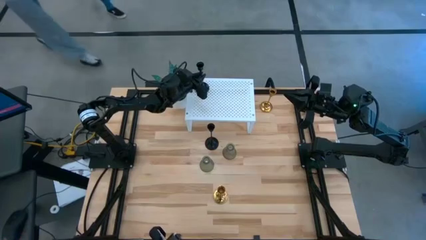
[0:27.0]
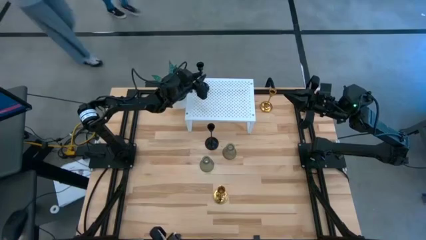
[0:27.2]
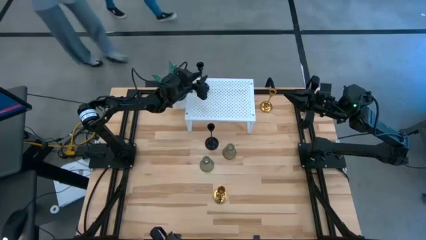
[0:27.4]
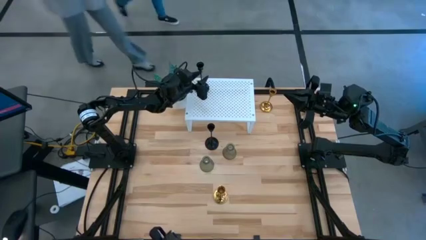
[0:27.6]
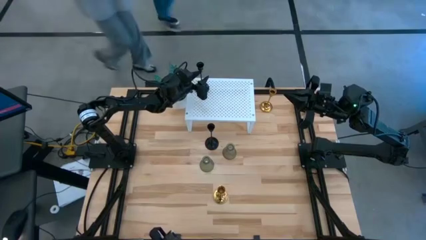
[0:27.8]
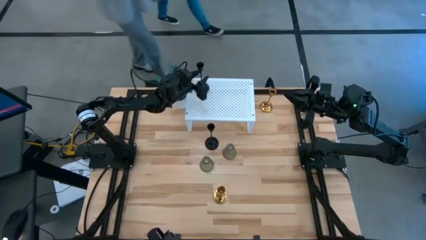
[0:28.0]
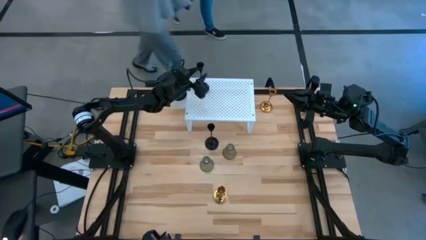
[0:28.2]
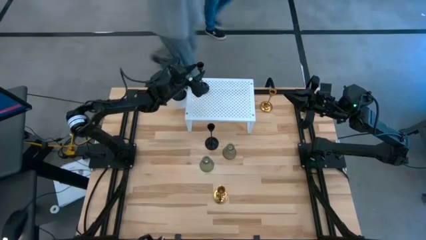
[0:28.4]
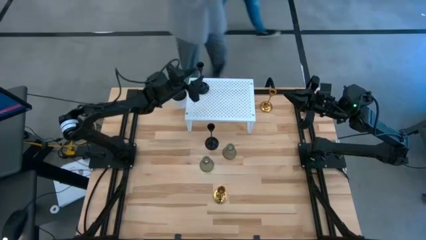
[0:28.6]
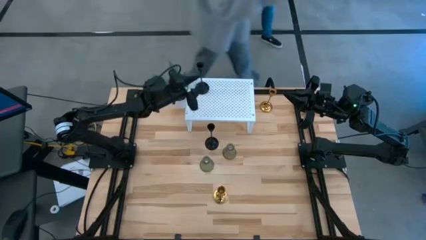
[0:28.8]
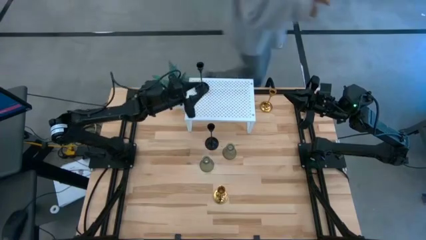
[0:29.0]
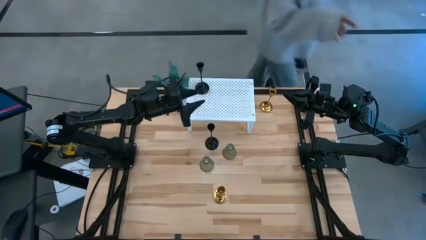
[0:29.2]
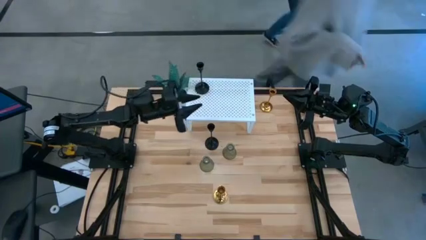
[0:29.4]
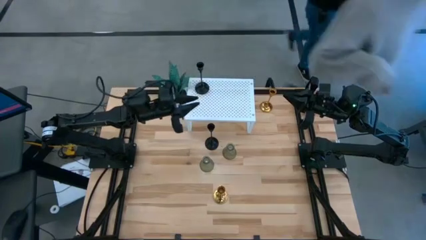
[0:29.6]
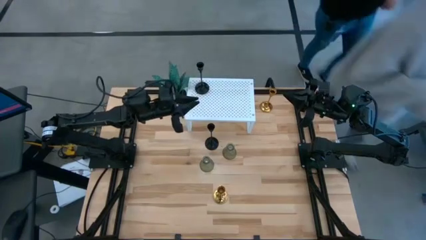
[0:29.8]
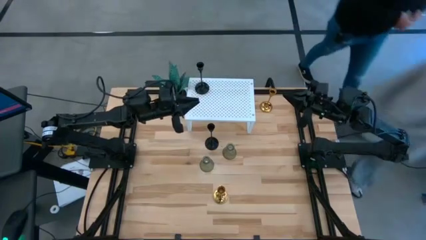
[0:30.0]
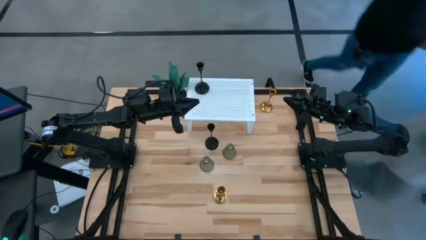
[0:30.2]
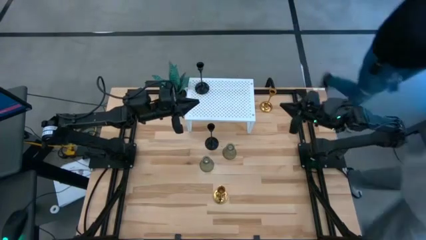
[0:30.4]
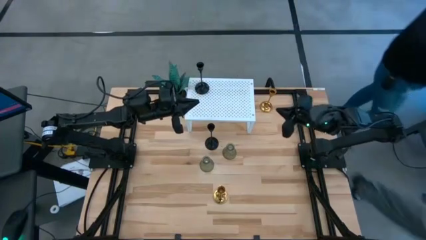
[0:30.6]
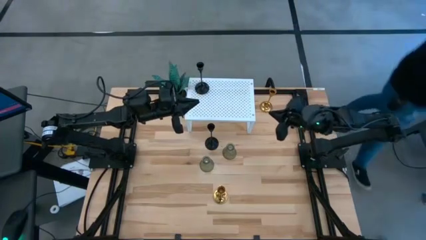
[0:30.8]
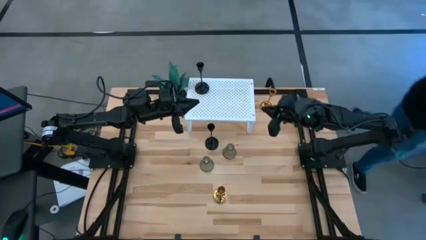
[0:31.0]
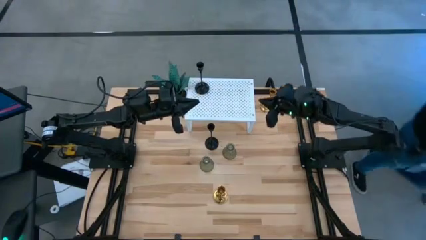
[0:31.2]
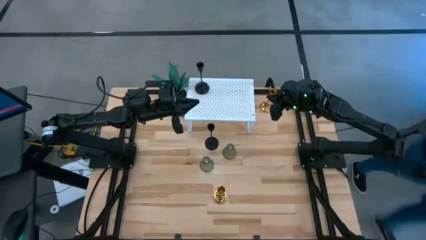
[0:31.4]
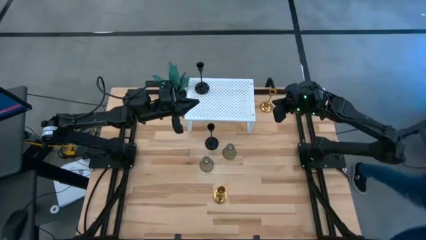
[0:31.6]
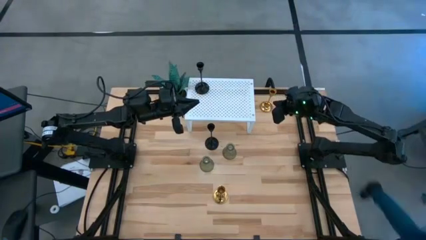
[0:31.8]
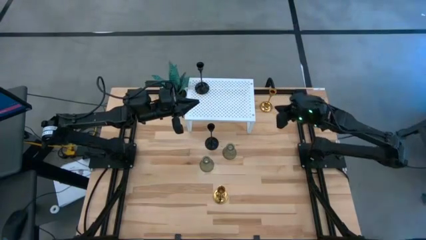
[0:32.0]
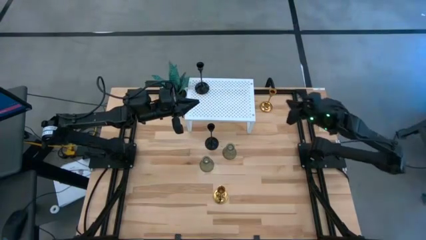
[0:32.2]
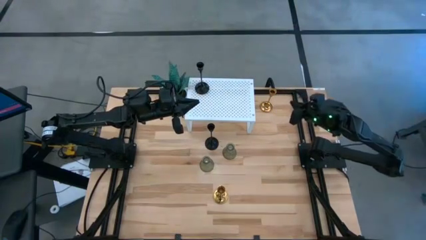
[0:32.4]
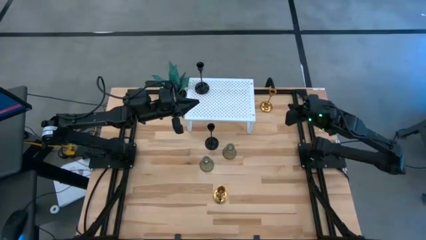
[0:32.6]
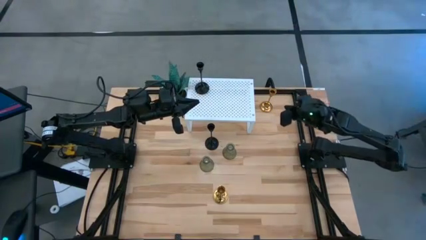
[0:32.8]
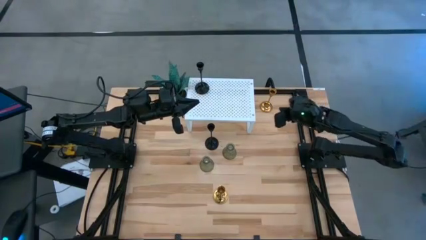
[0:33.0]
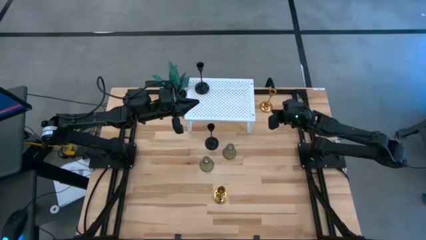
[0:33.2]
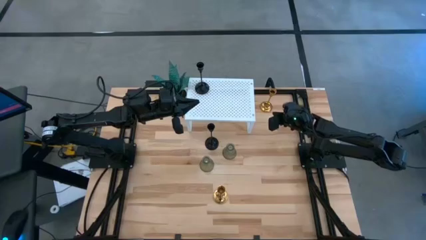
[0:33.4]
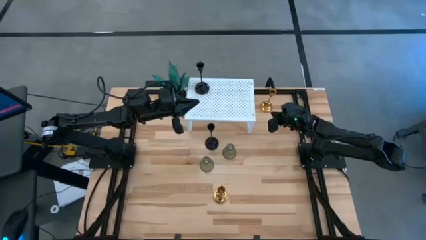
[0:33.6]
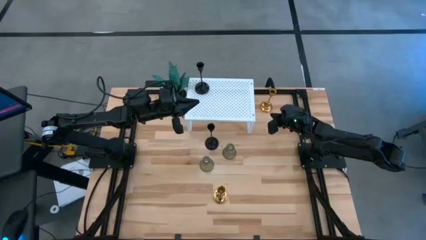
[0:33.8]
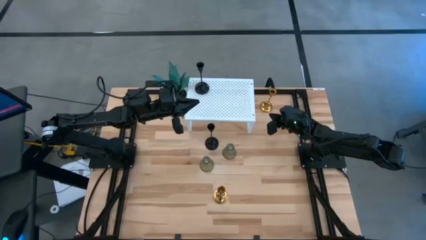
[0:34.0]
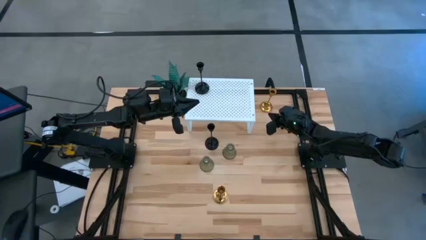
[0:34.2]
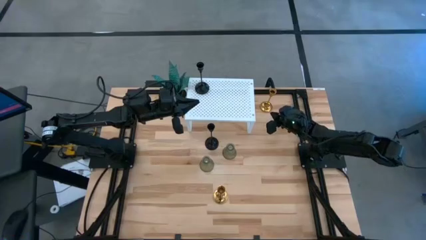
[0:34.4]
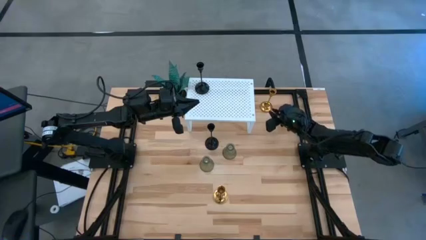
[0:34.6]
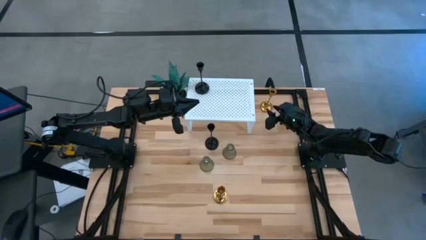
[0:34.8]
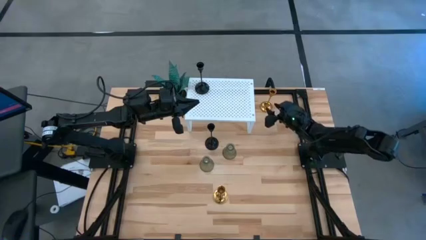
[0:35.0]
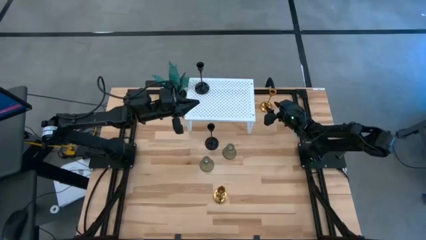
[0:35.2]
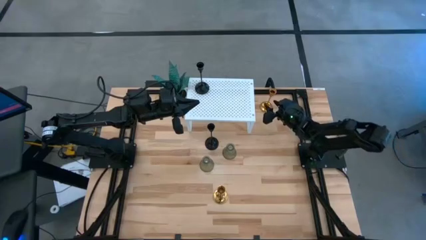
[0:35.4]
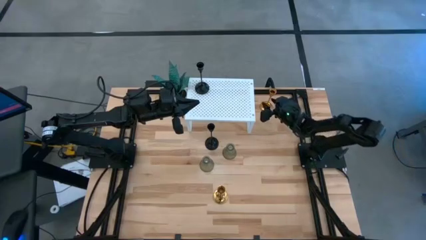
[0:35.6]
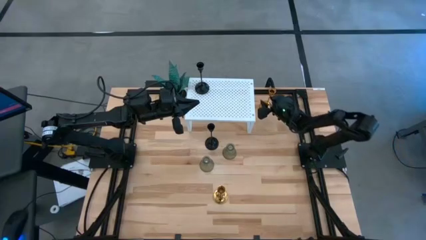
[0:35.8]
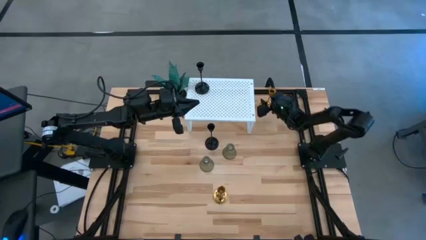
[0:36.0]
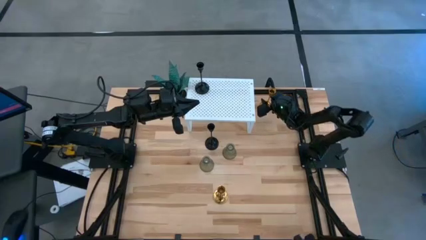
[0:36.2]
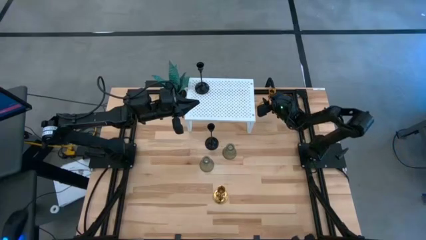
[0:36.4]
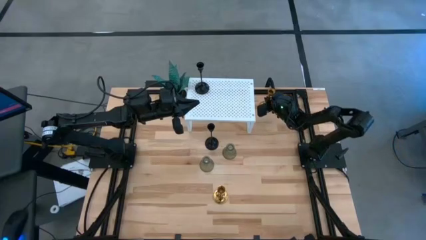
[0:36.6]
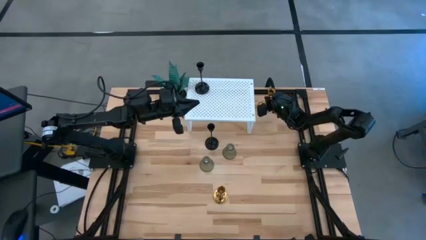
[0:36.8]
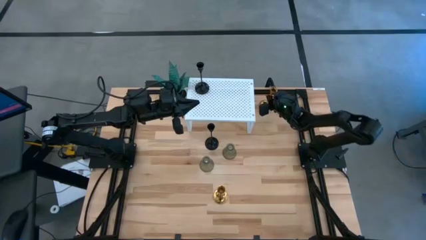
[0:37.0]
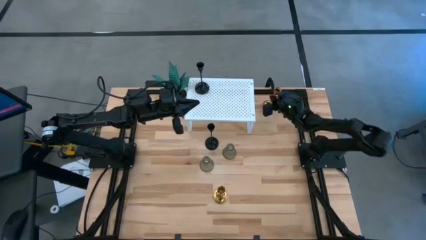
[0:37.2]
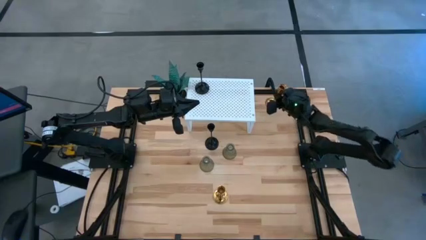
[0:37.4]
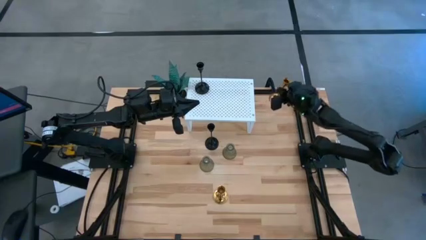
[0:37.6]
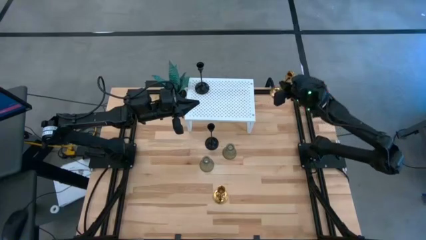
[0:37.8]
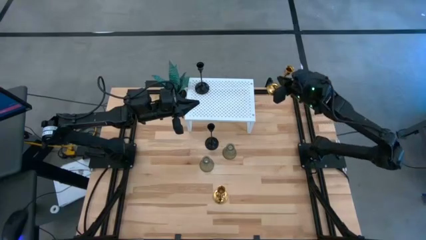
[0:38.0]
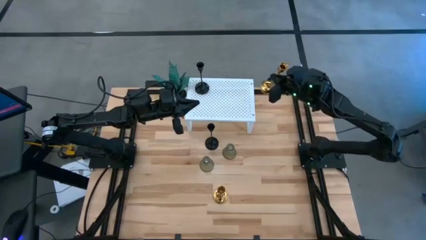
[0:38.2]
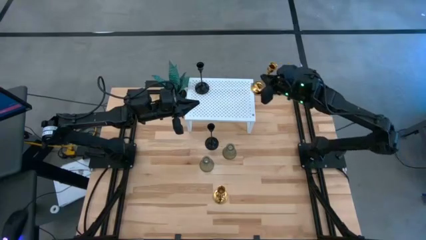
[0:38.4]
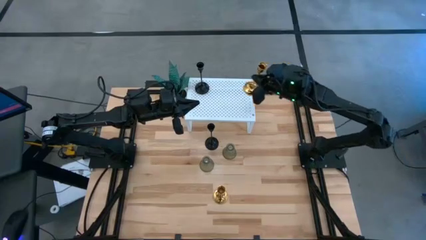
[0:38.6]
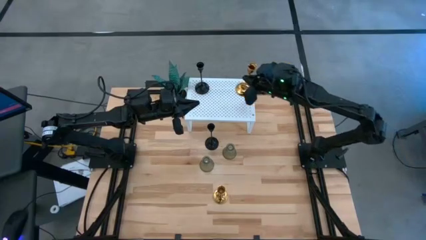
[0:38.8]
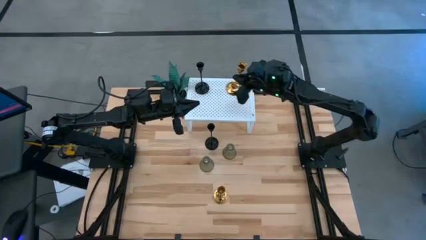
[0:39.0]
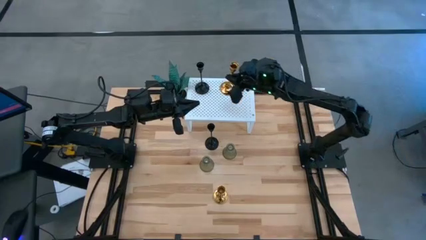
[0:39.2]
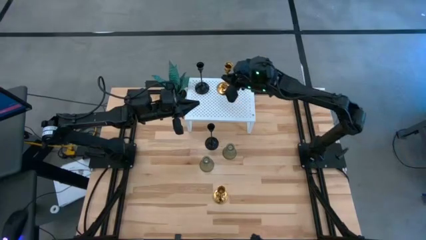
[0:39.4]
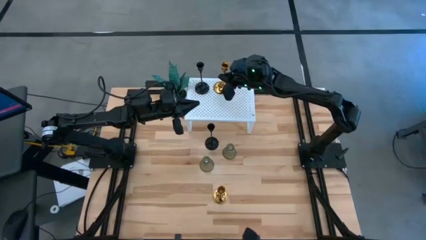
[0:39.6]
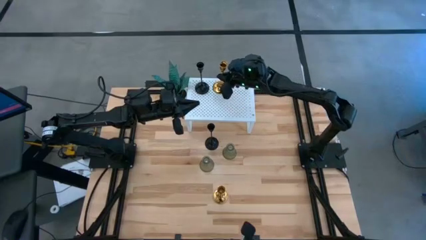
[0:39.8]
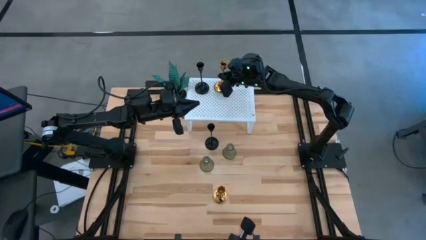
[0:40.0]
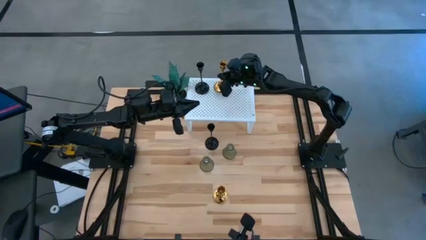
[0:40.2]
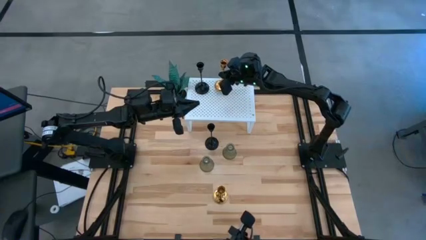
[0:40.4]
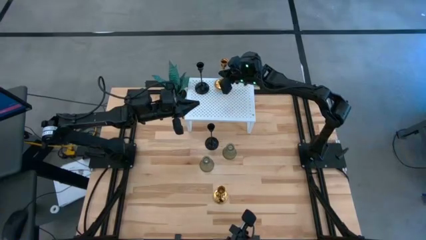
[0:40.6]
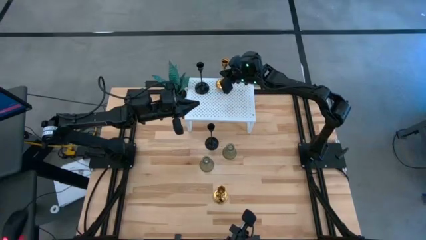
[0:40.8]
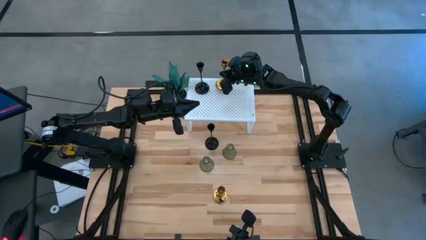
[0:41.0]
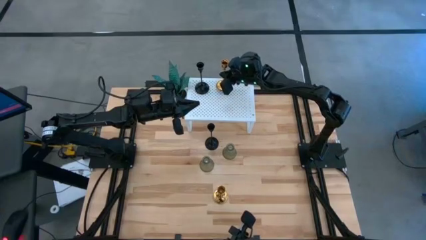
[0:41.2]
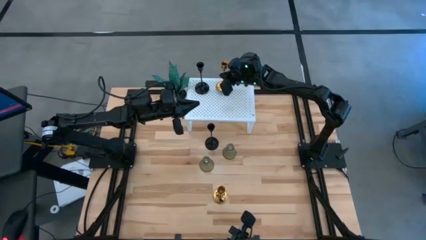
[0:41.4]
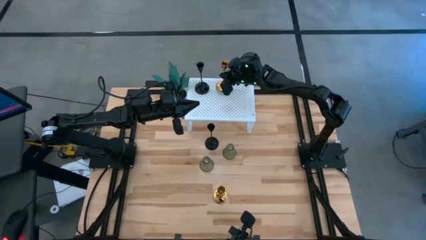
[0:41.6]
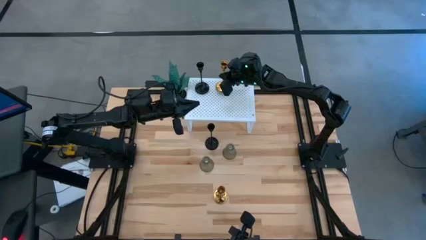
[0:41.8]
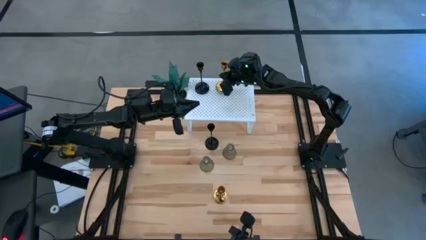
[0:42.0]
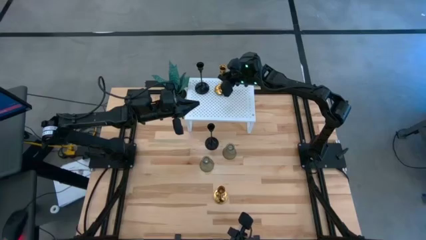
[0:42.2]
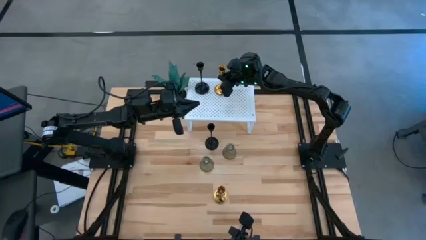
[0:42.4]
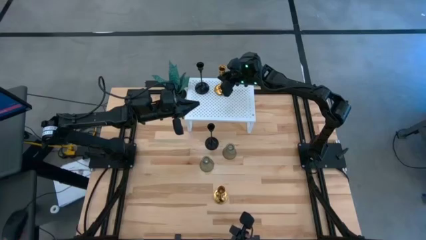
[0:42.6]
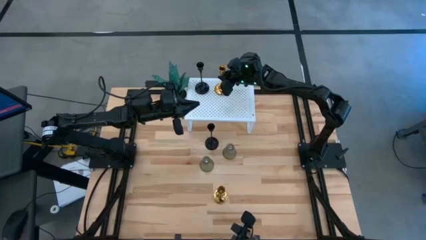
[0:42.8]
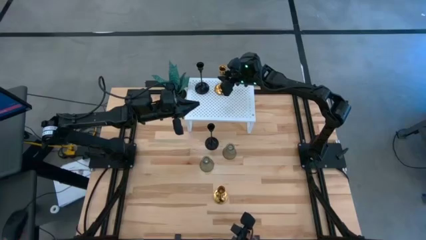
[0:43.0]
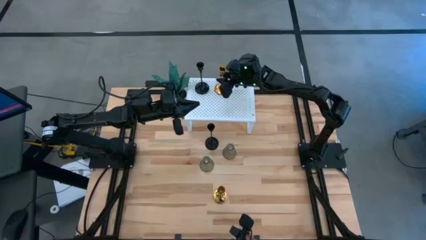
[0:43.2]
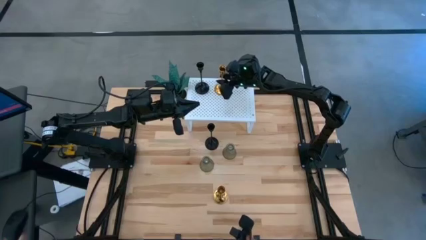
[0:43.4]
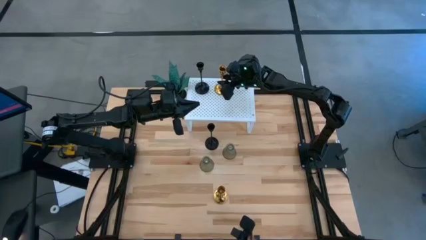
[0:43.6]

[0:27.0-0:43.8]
Task: Pick & Place candle stick holders
Put the top gold candle holder on the shelf
